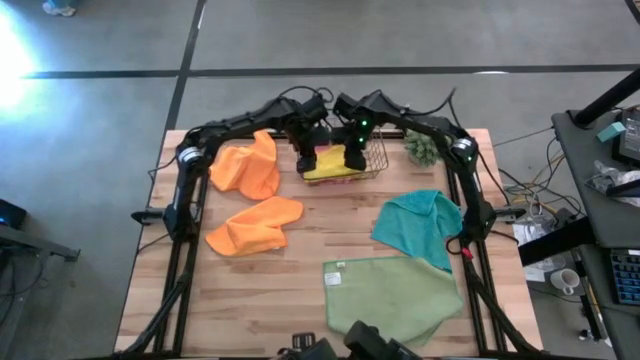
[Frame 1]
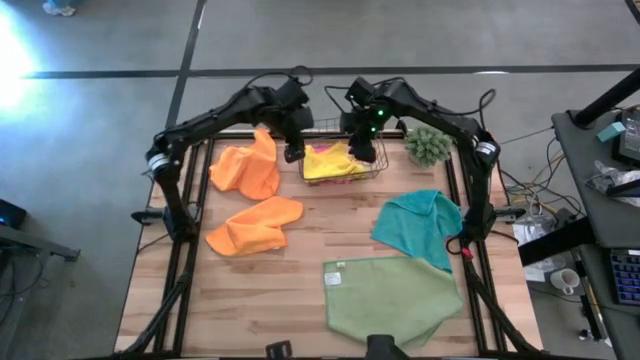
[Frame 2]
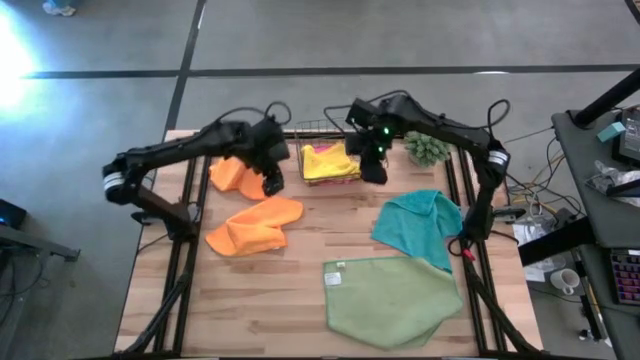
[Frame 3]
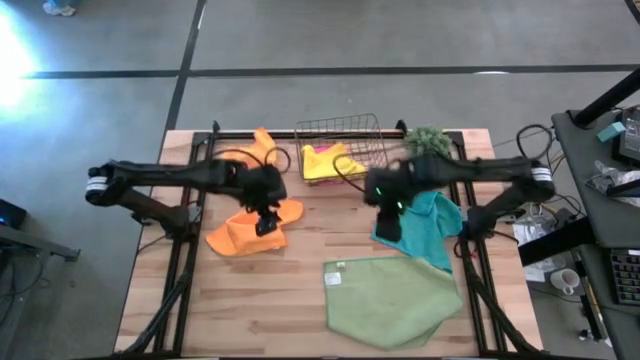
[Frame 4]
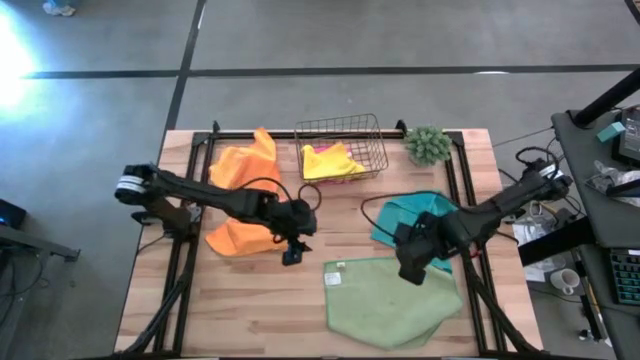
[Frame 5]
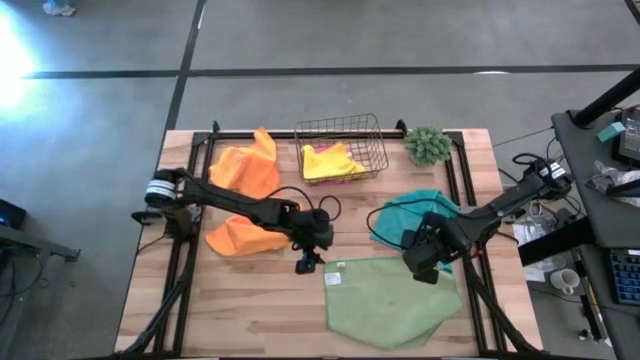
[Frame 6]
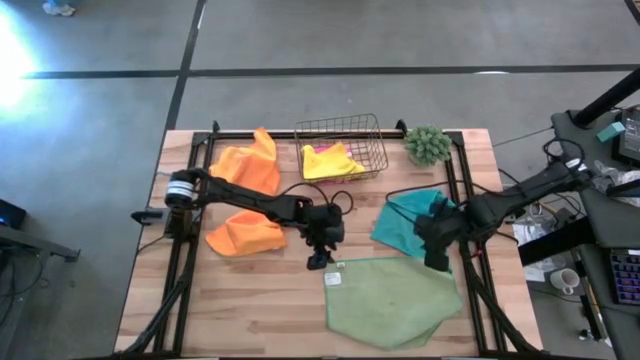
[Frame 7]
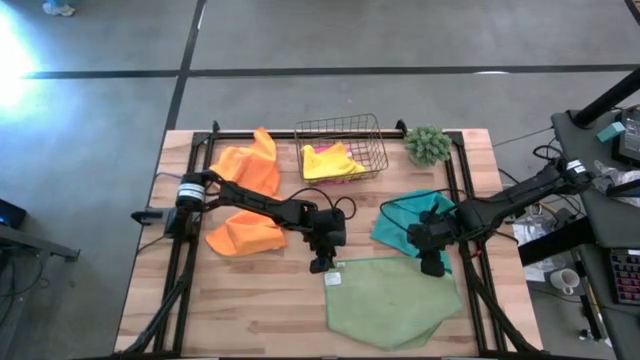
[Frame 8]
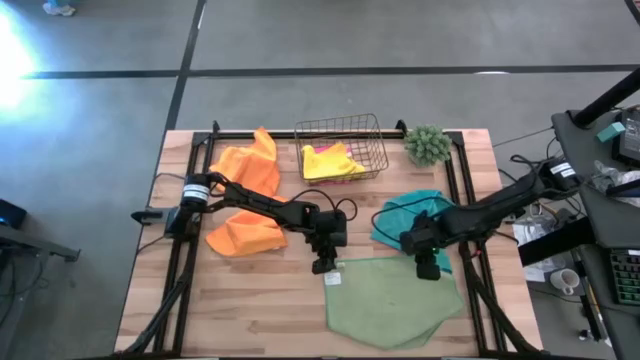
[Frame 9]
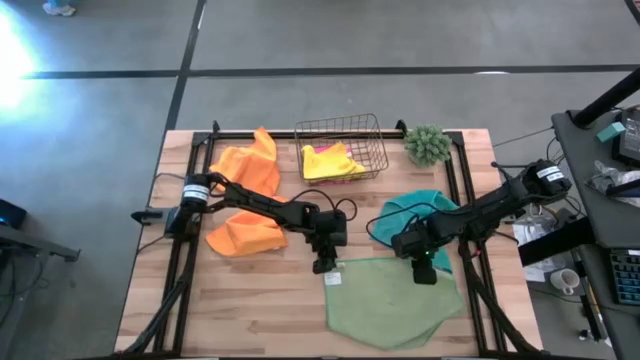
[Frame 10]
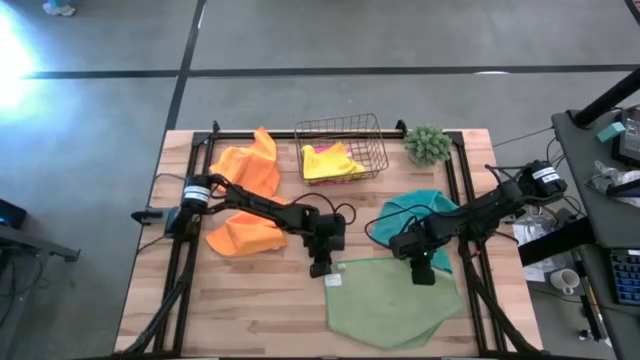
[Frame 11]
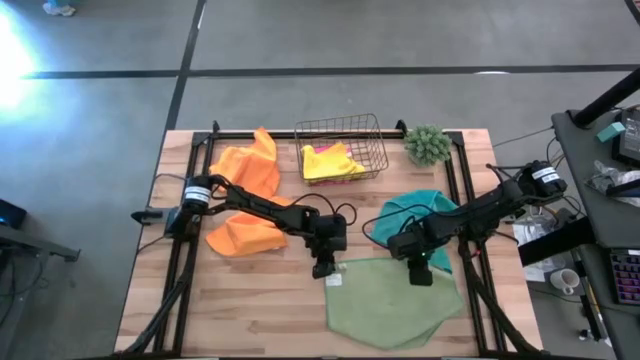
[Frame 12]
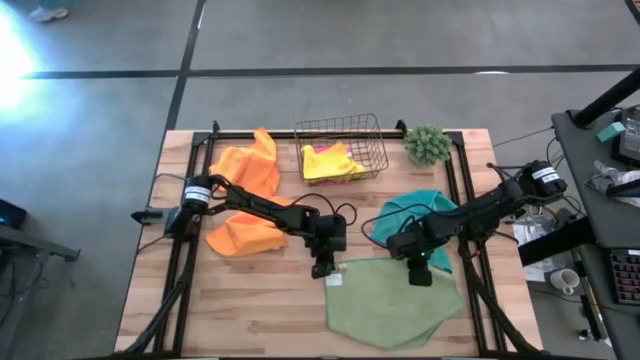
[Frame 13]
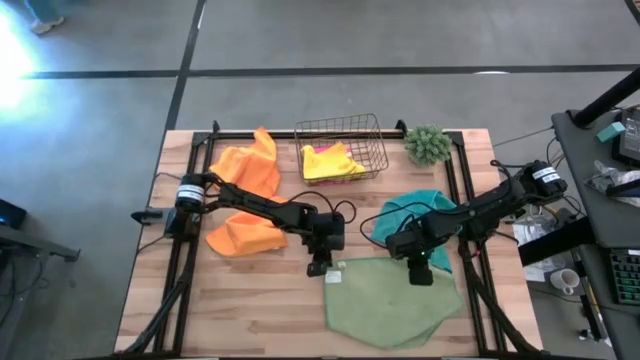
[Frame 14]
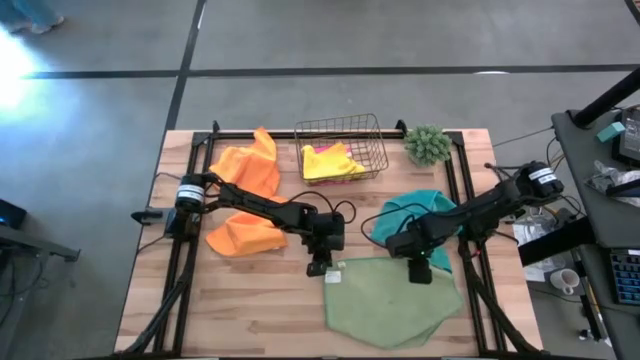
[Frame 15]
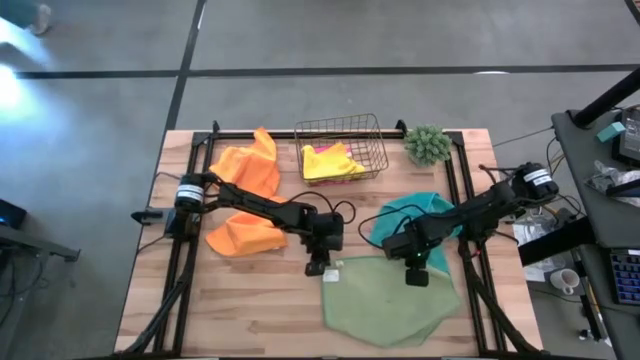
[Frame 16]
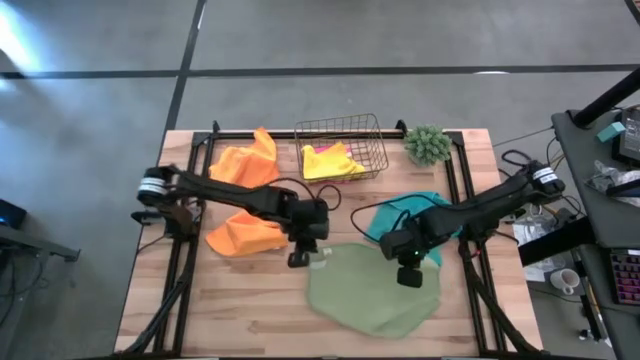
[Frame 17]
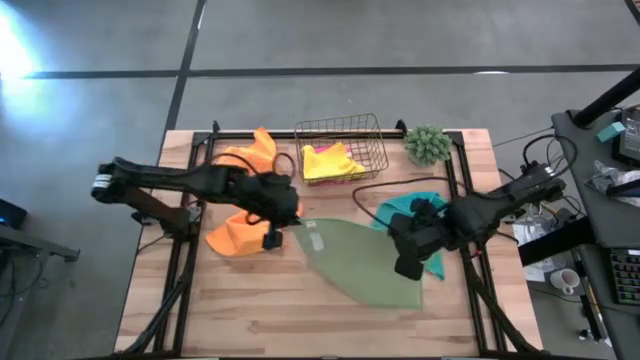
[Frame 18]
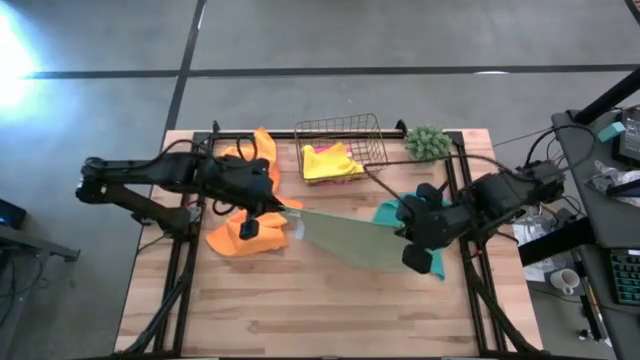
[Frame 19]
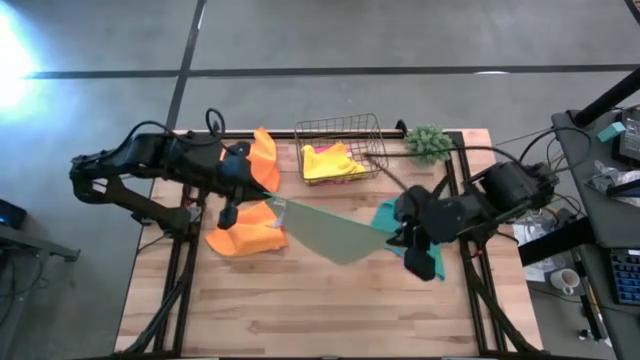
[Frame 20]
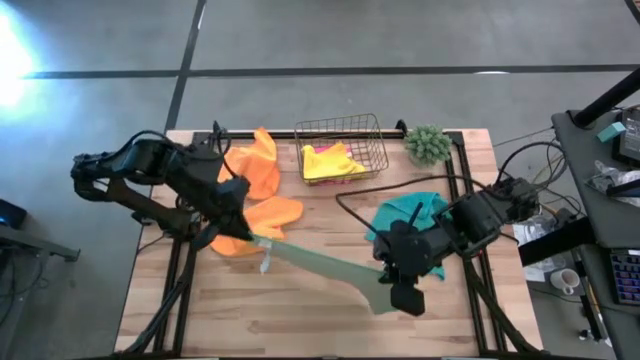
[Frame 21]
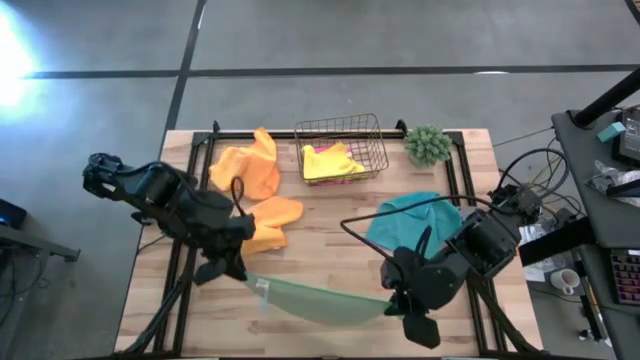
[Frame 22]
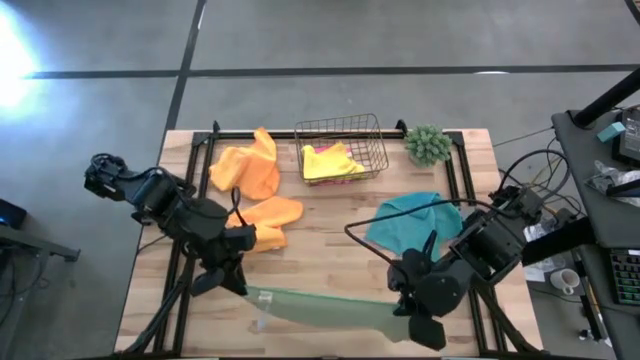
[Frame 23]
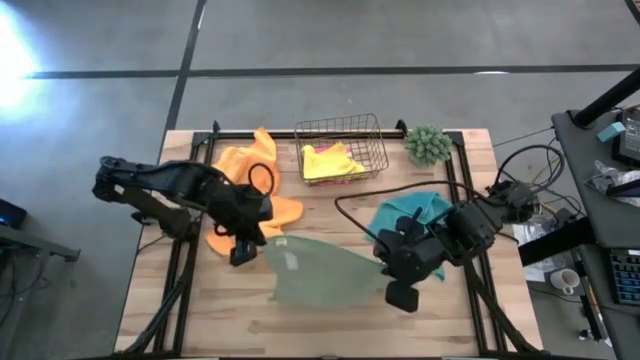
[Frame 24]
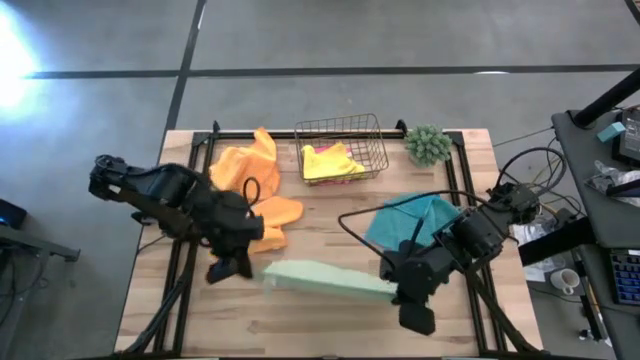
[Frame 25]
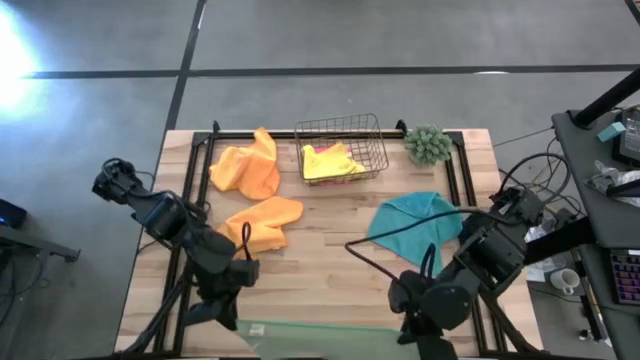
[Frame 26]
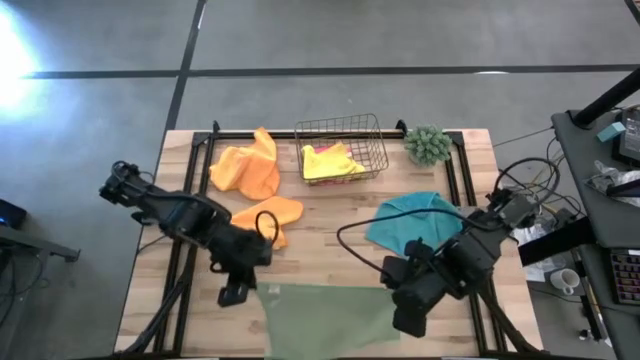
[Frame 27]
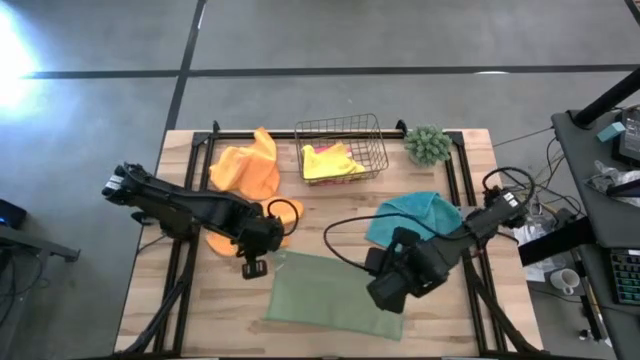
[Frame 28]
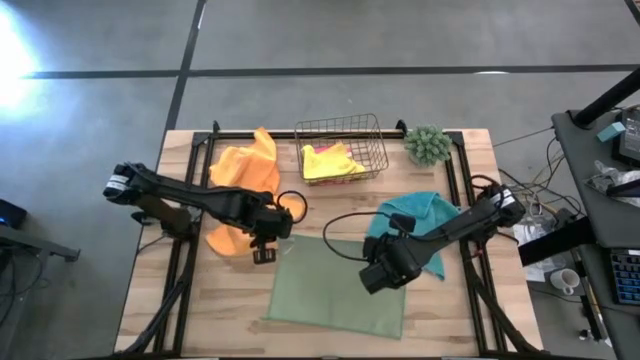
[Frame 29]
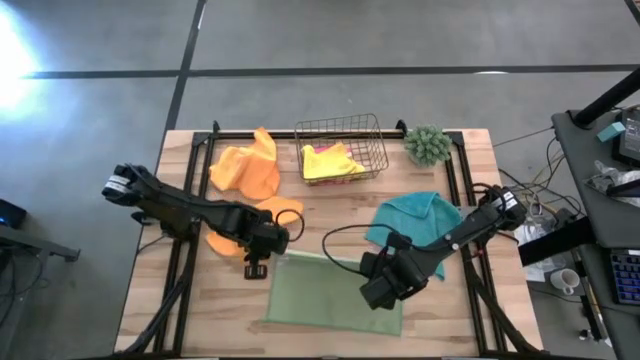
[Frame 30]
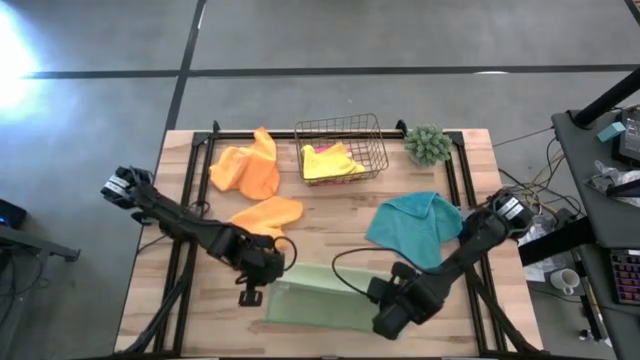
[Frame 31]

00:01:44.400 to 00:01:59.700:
Task: Fold microfiber towels
Fold the green microfiber cloth

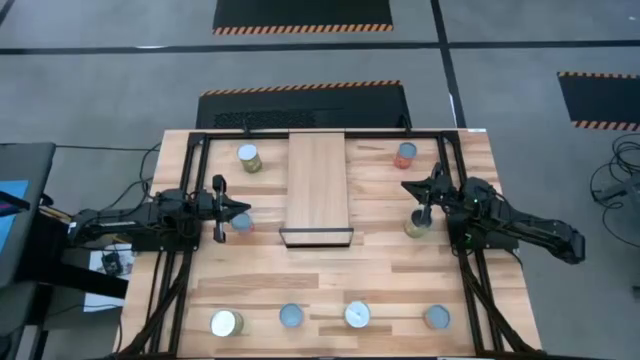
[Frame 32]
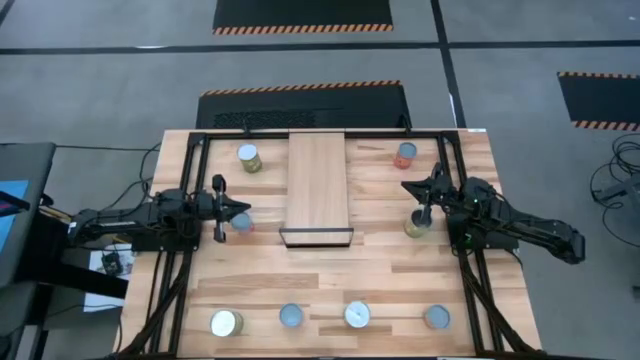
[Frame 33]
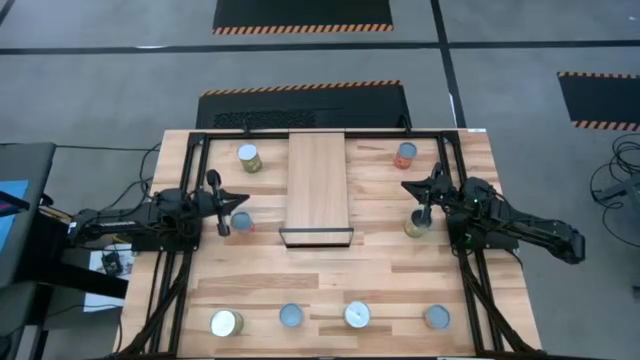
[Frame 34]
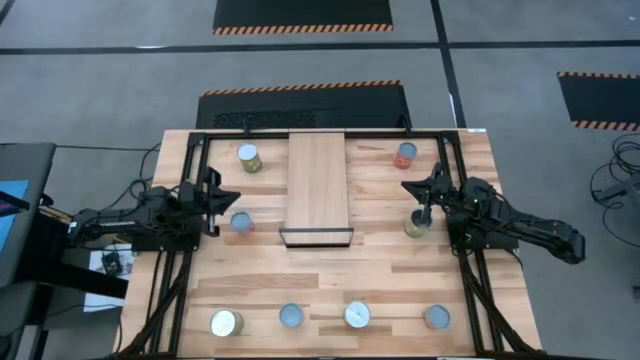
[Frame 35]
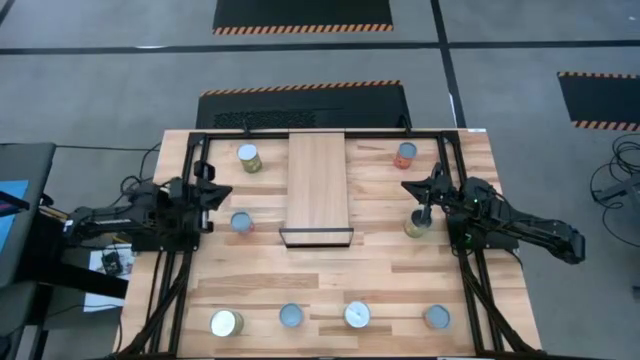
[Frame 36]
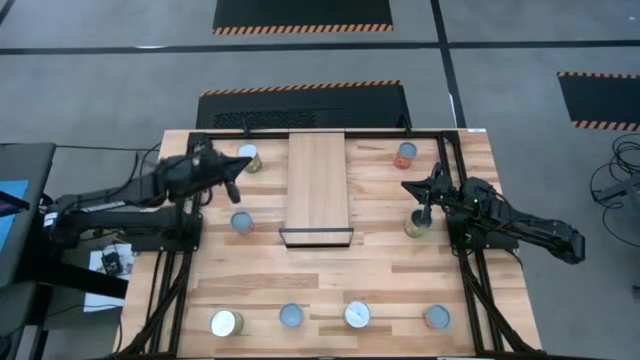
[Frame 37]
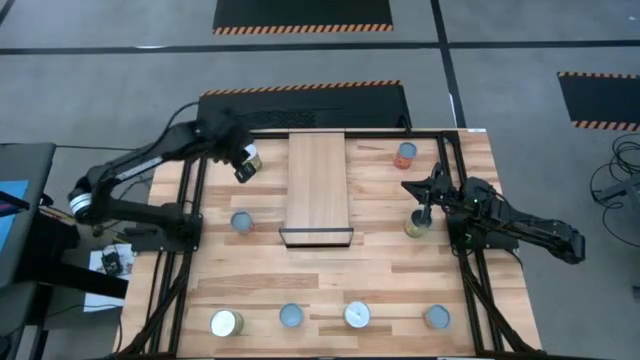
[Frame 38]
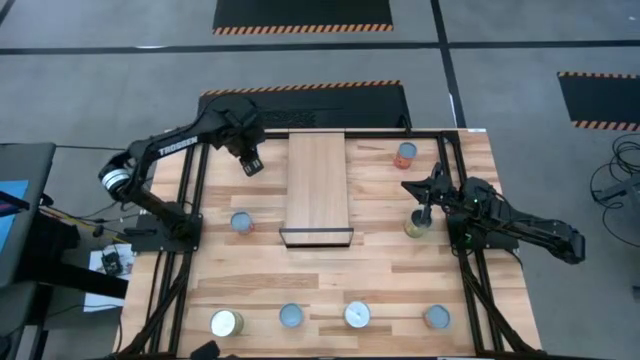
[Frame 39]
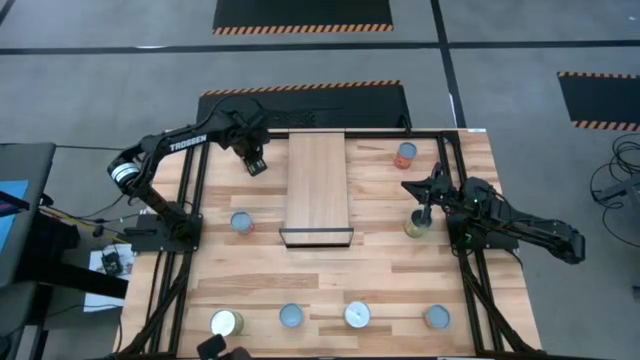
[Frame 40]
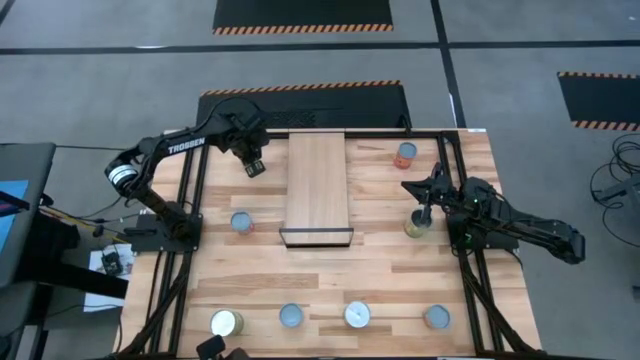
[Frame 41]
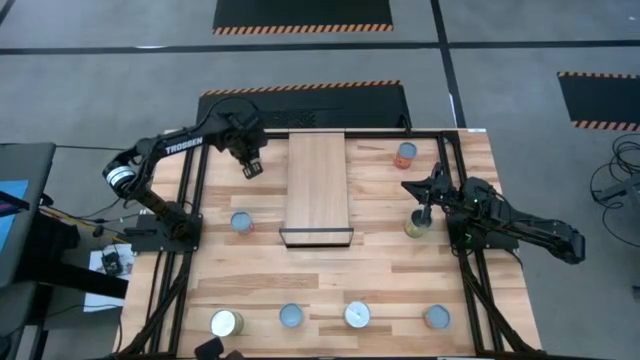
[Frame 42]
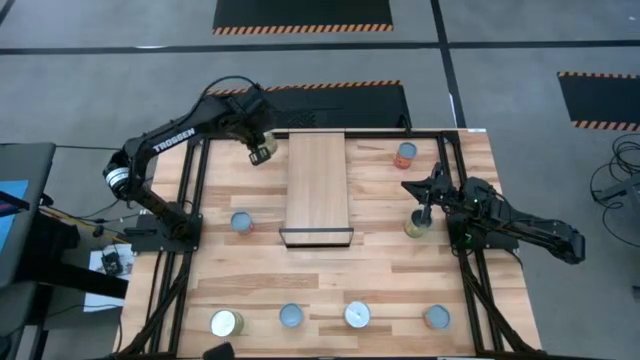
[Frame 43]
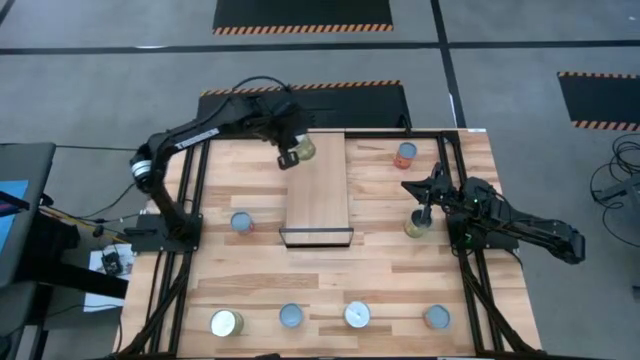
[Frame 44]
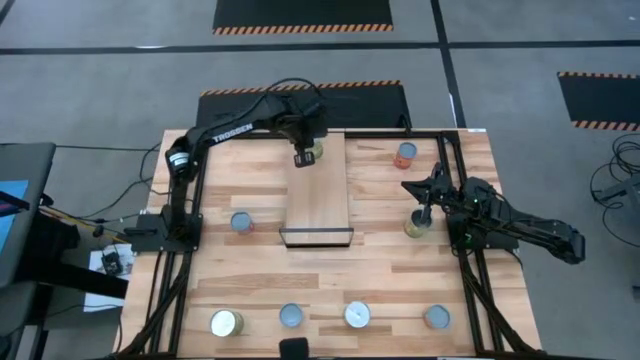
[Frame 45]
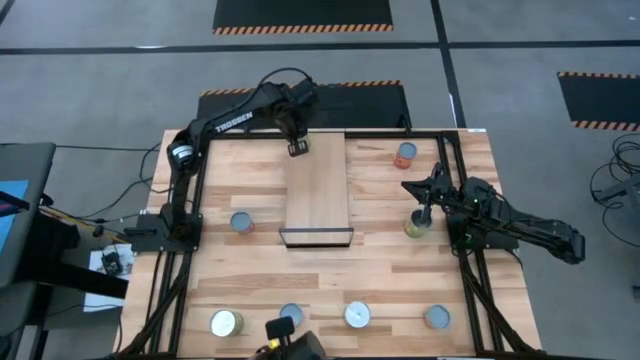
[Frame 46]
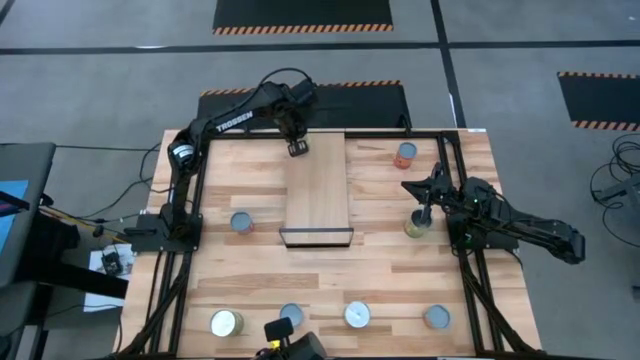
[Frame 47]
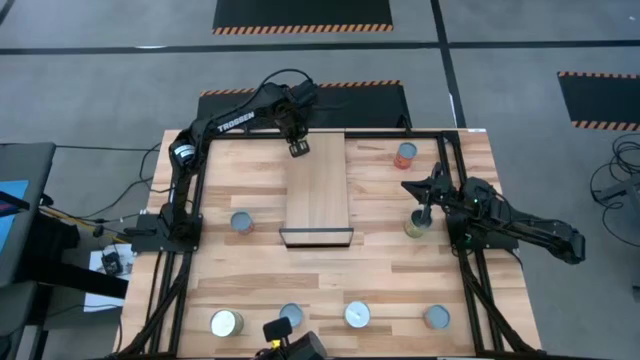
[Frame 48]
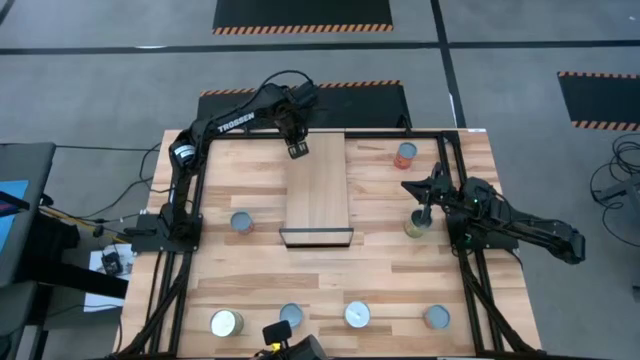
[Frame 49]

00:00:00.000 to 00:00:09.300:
Task: Pick and place cans onto a shelf
Put the top canned pears on the shelf
